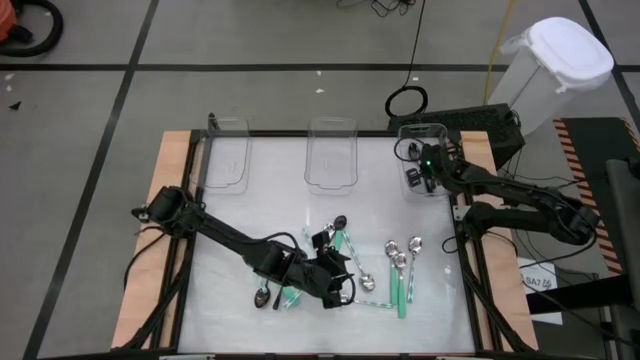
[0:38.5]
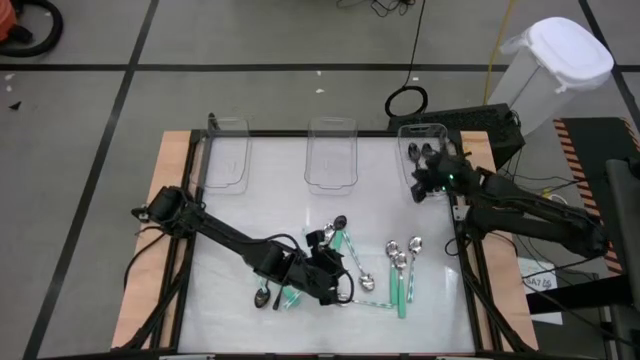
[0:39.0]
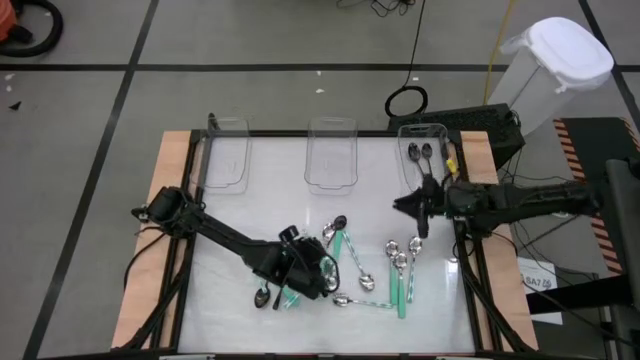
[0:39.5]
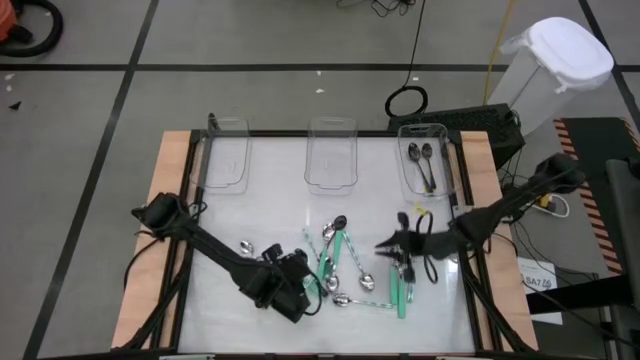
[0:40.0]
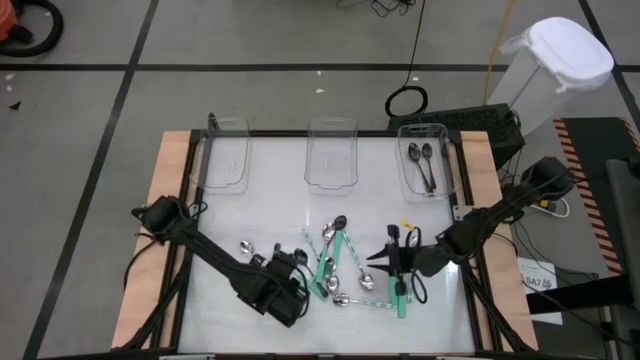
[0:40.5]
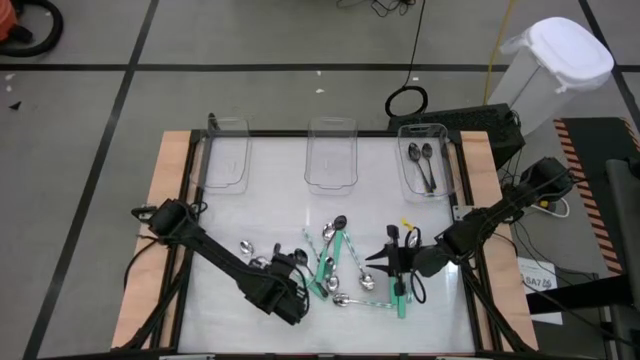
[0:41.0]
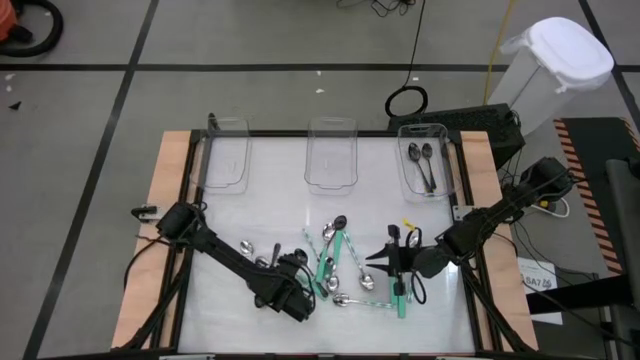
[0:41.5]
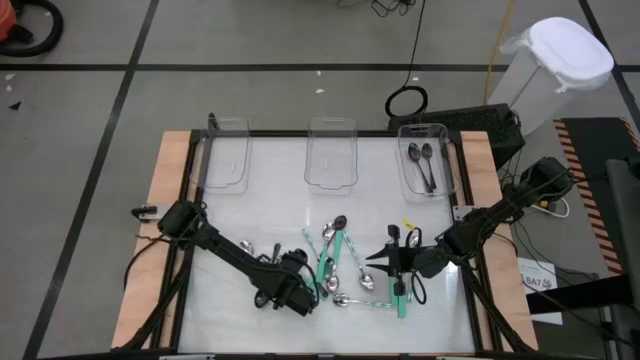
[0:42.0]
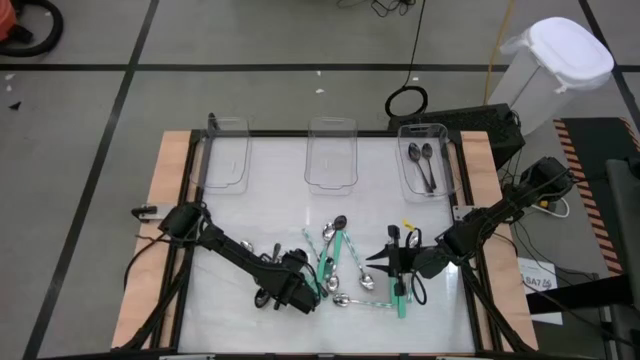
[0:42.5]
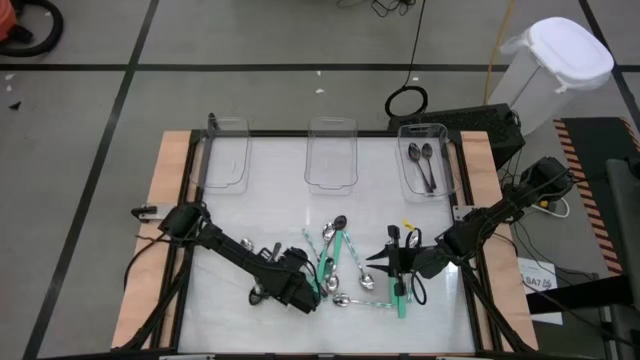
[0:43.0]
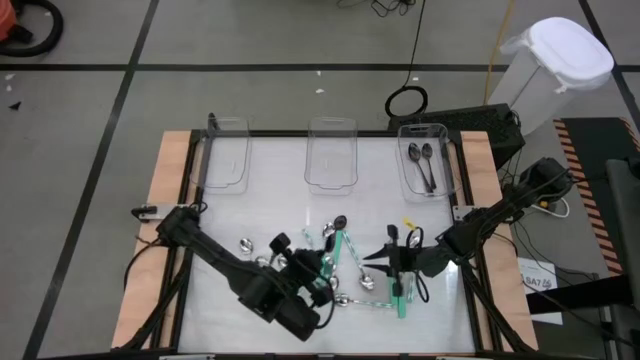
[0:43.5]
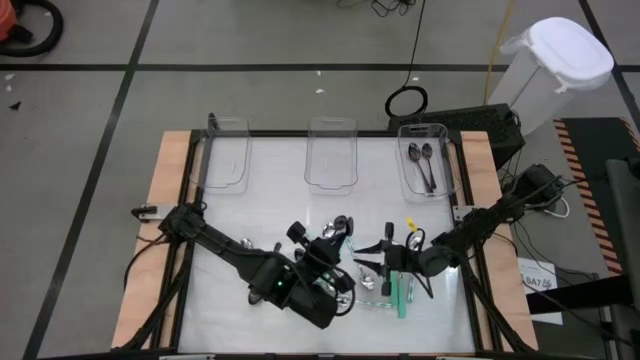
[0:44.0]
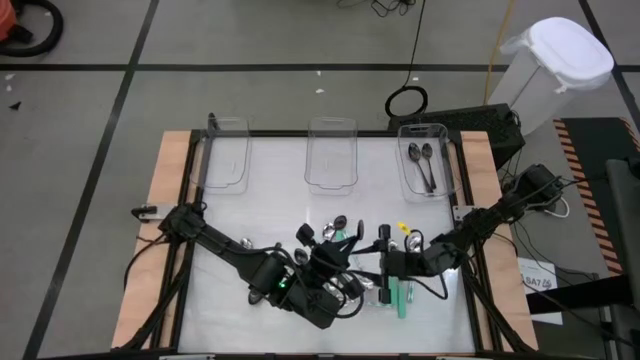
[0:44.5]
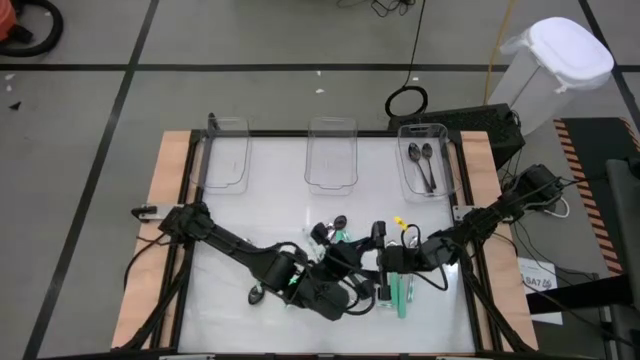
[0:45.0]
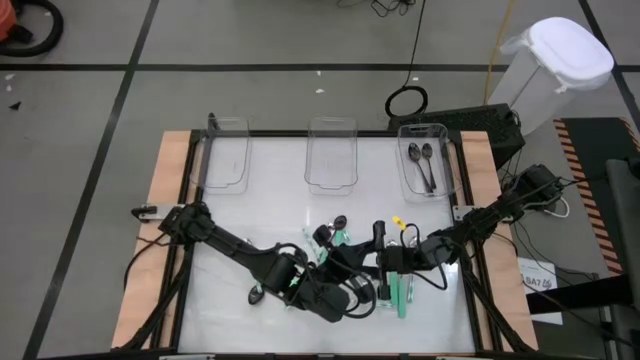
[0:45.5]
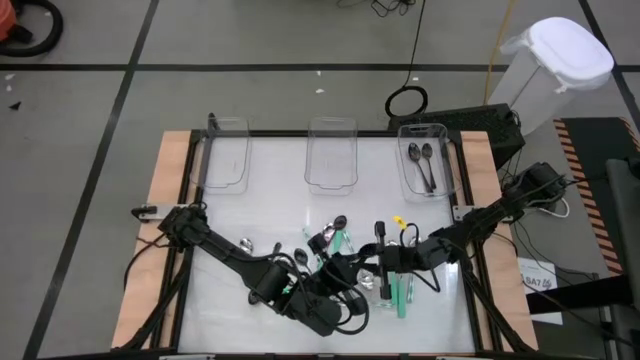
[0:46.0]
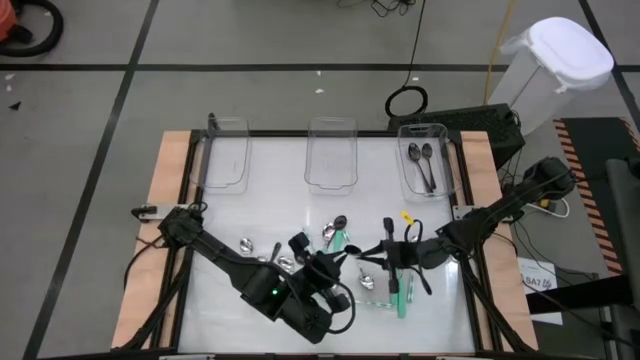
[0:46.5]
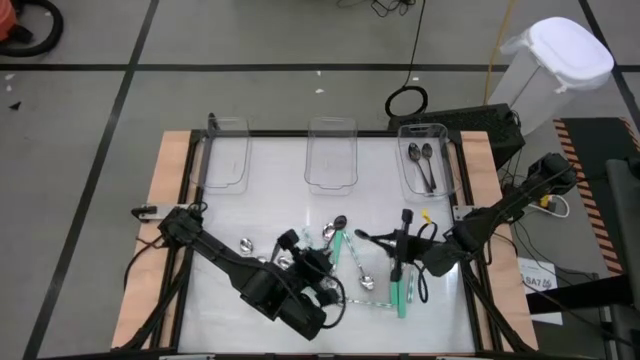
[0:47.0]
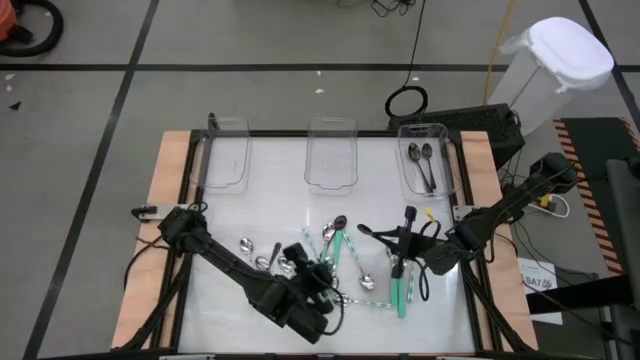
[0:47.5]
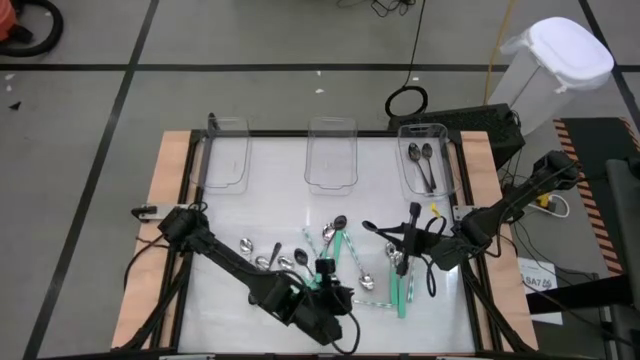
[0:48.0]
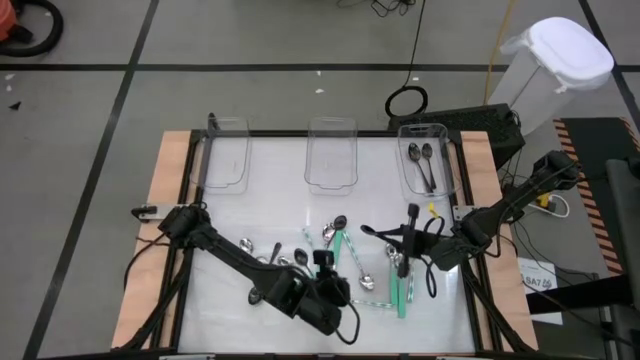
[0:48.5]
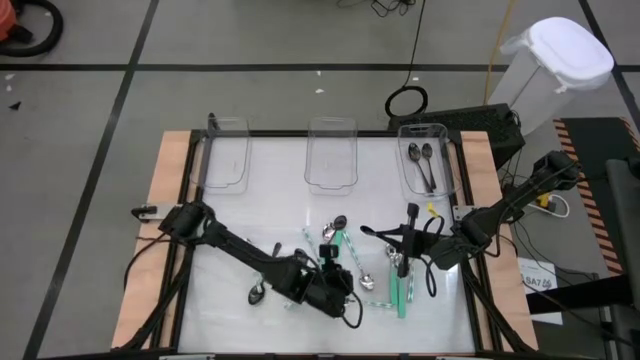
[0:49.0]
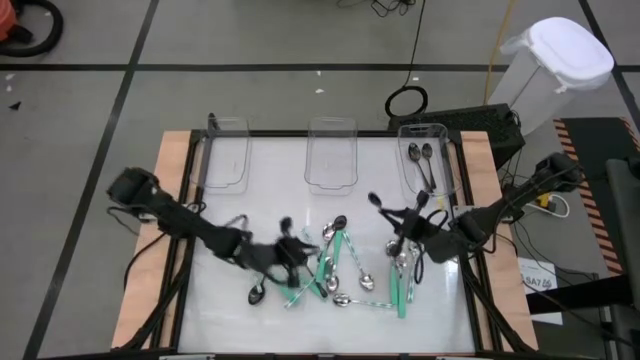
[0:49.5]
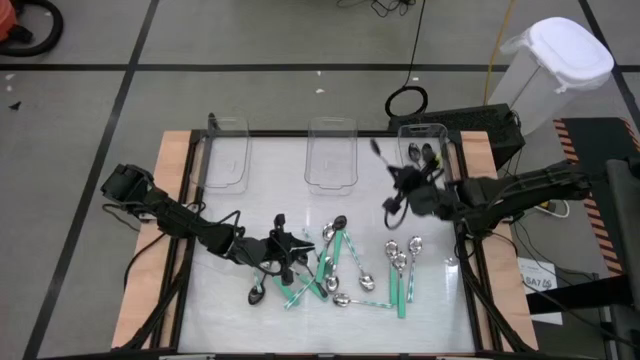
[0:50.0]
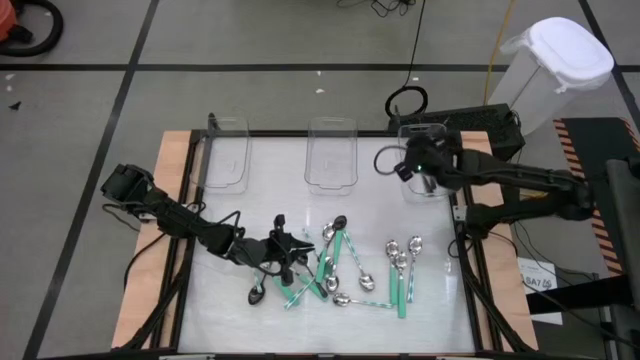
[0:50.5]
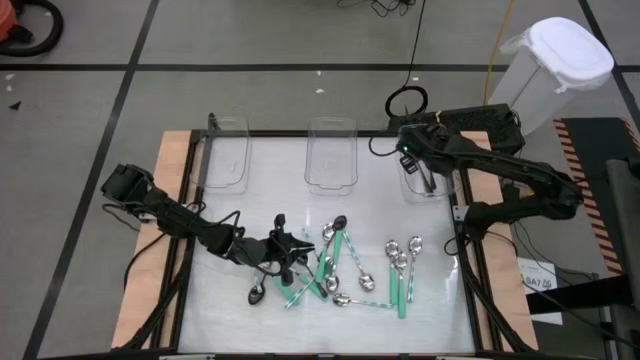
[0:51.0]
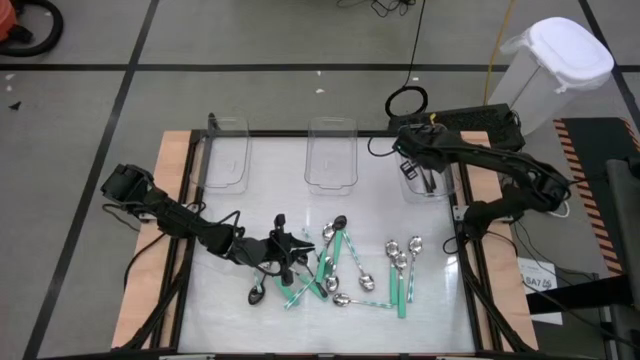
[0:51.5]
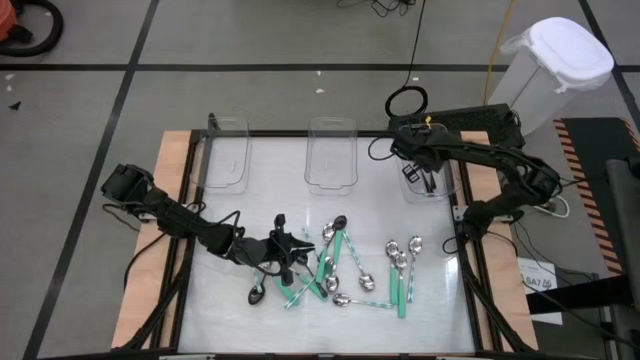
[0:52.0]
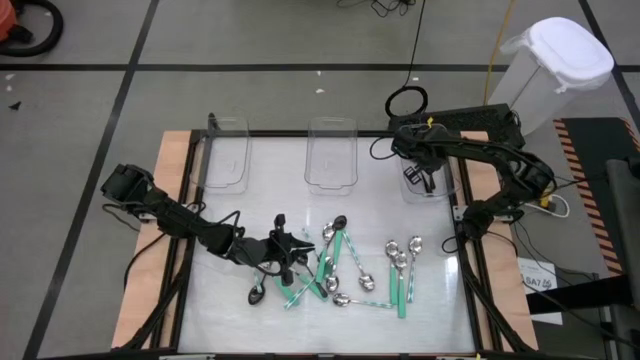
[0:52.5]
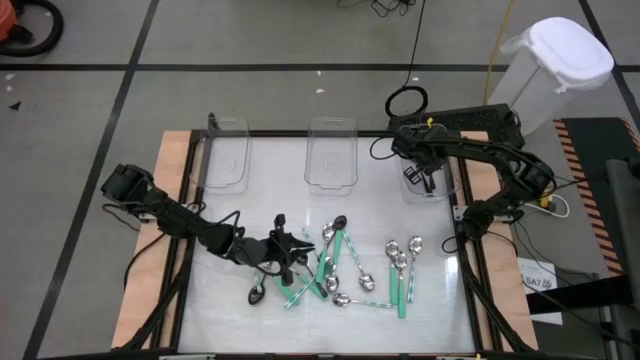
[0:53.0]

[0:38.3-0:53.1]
Task: Sort silverware by color (type)
Put the black spoon into the right transparent bin
